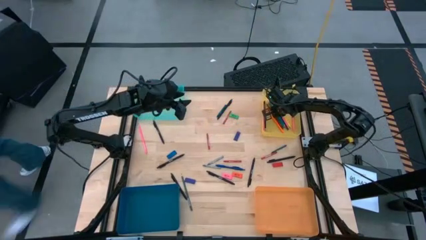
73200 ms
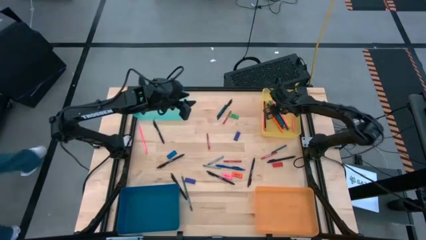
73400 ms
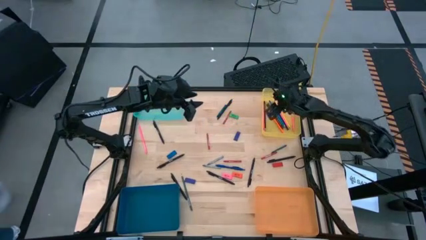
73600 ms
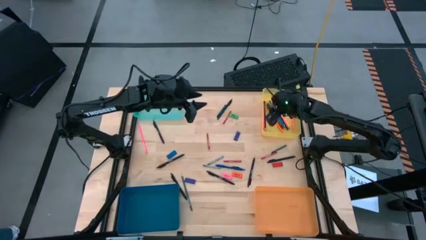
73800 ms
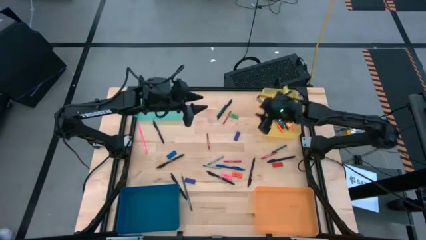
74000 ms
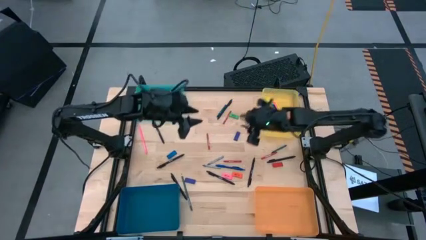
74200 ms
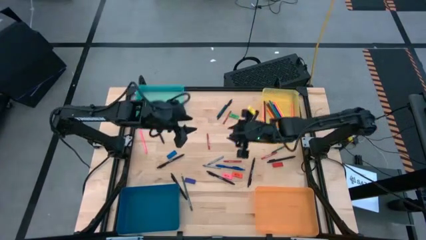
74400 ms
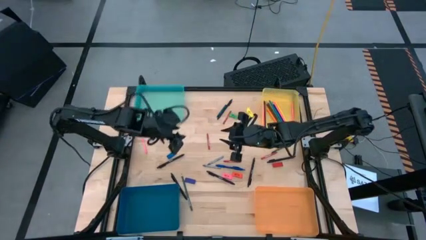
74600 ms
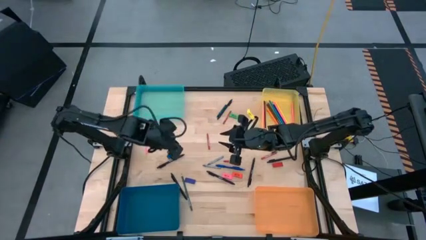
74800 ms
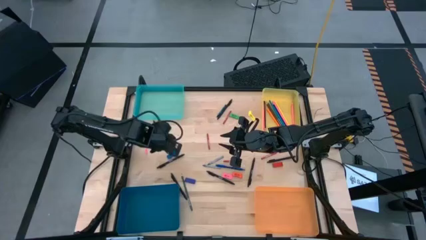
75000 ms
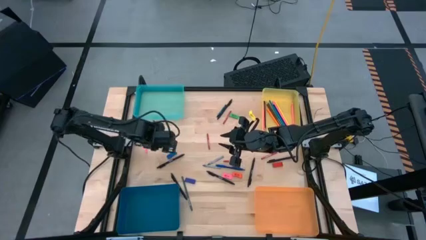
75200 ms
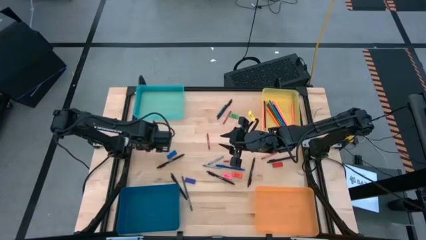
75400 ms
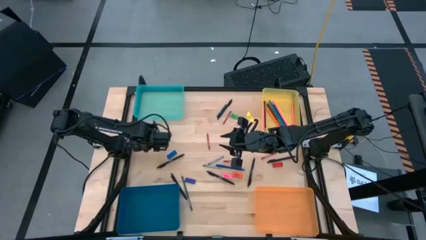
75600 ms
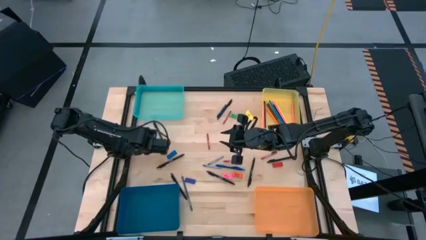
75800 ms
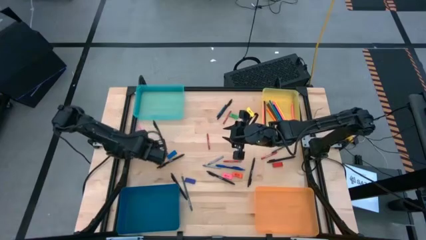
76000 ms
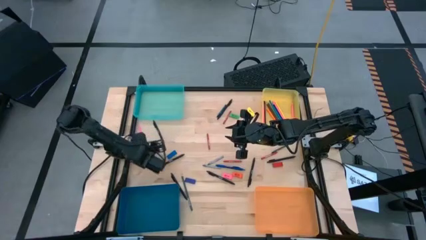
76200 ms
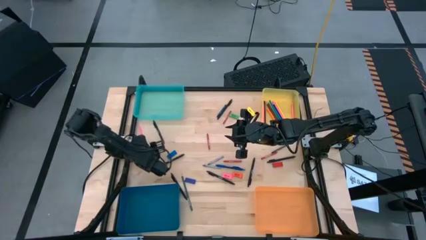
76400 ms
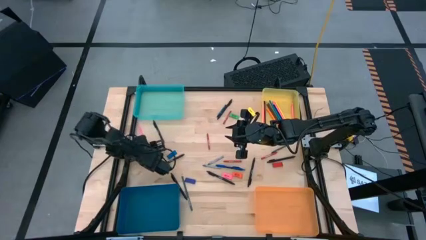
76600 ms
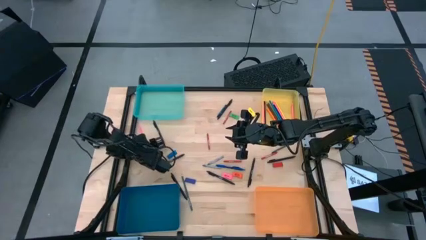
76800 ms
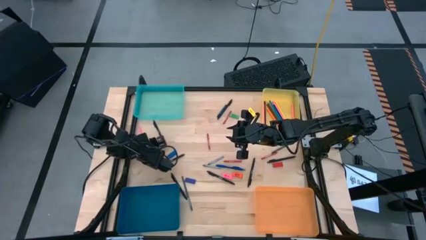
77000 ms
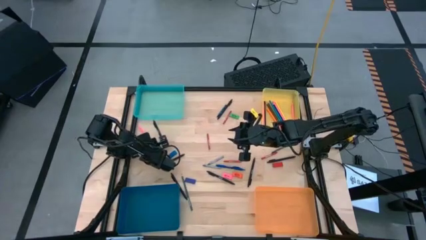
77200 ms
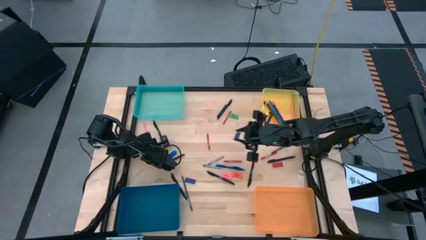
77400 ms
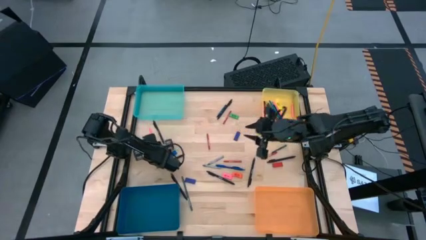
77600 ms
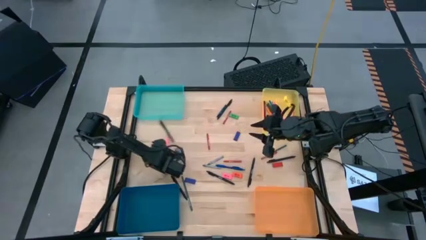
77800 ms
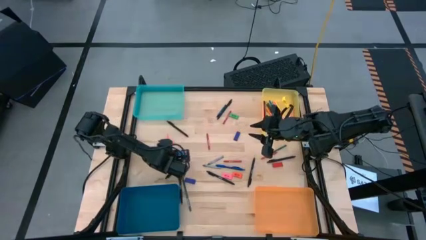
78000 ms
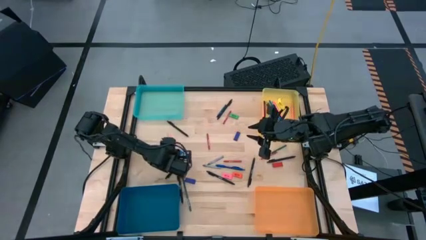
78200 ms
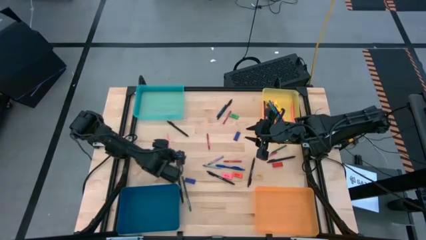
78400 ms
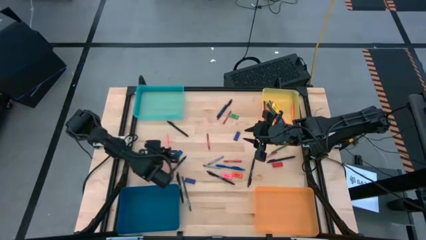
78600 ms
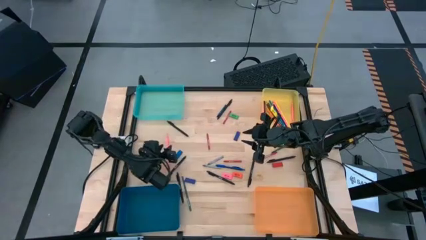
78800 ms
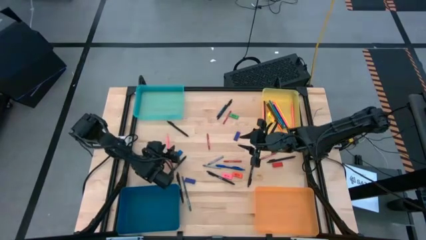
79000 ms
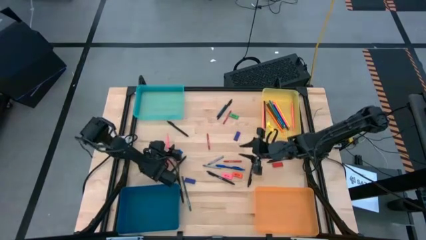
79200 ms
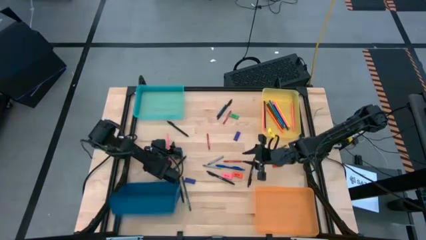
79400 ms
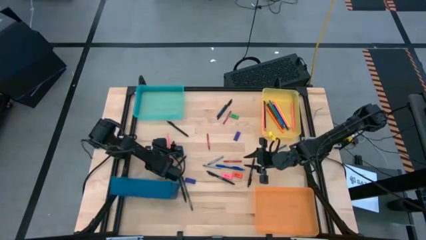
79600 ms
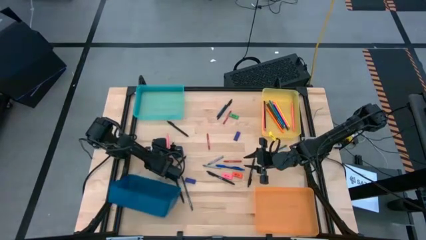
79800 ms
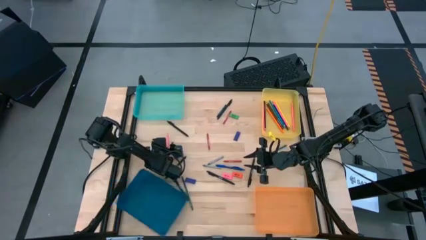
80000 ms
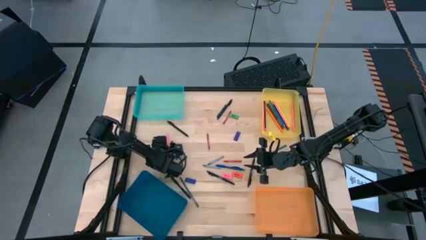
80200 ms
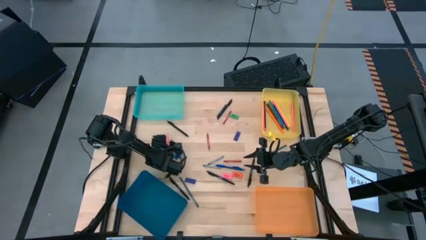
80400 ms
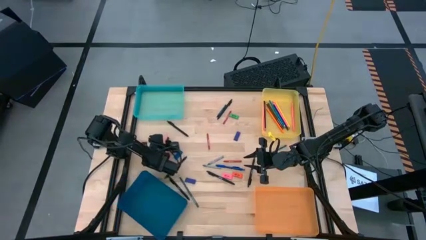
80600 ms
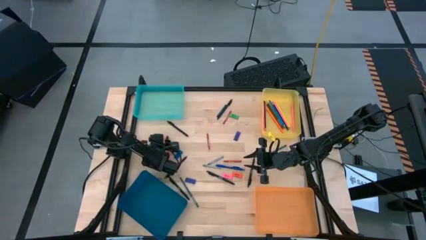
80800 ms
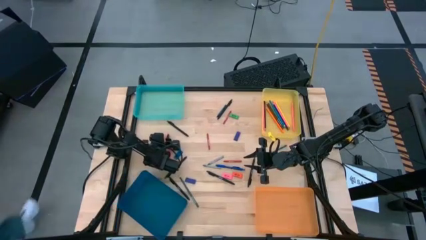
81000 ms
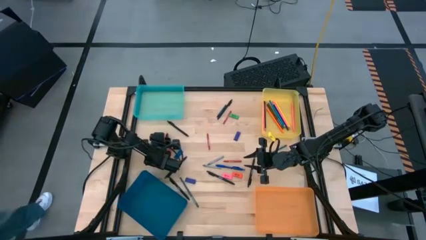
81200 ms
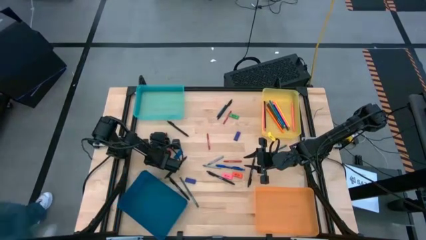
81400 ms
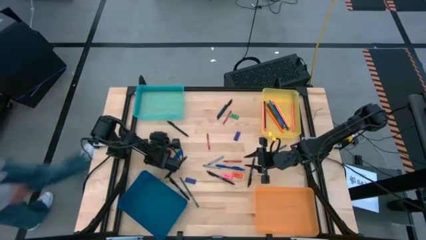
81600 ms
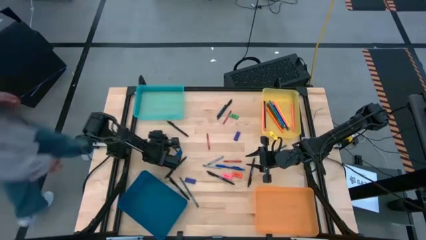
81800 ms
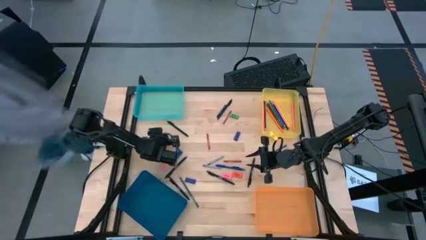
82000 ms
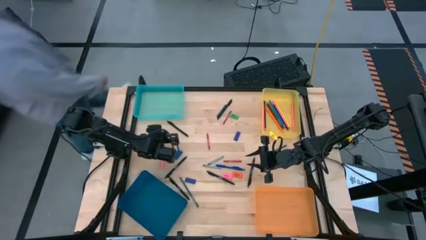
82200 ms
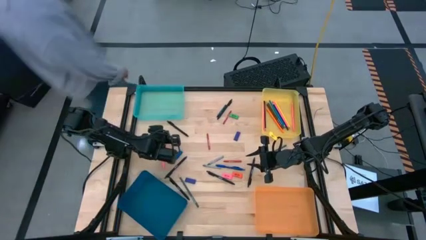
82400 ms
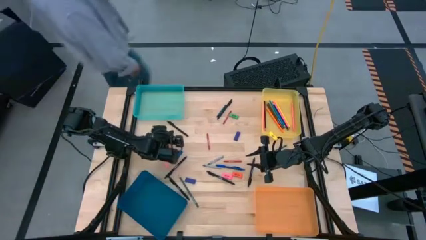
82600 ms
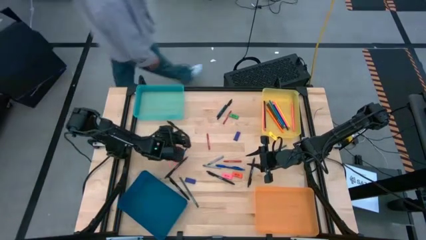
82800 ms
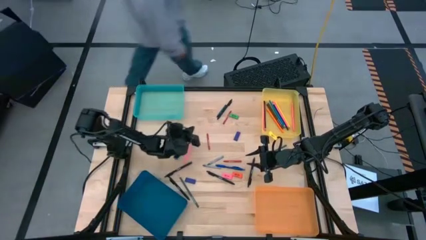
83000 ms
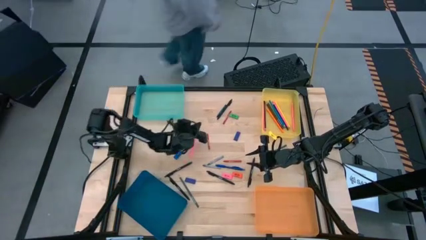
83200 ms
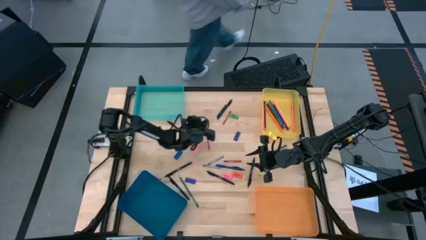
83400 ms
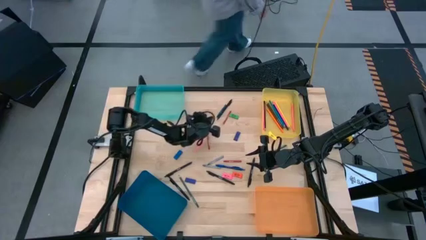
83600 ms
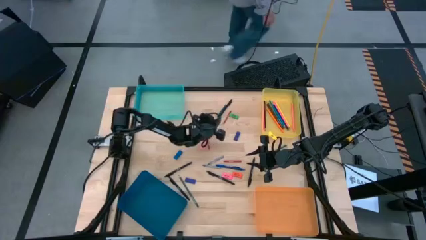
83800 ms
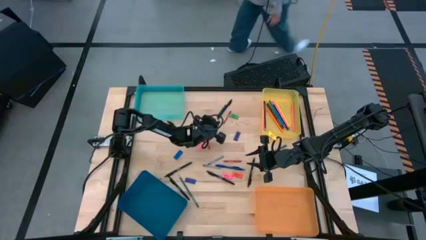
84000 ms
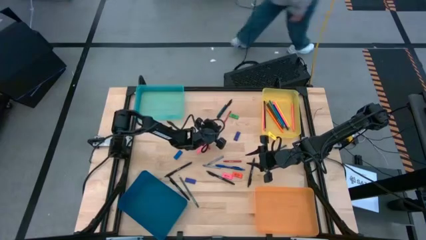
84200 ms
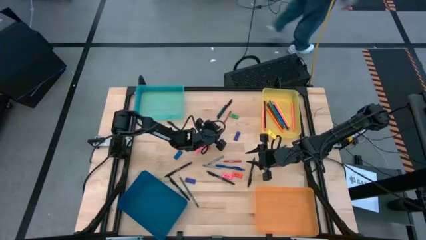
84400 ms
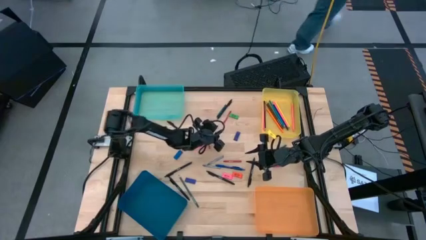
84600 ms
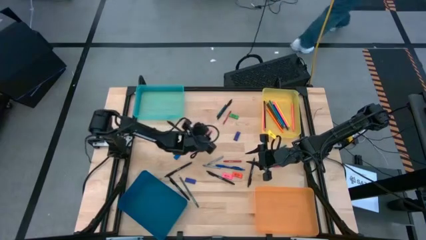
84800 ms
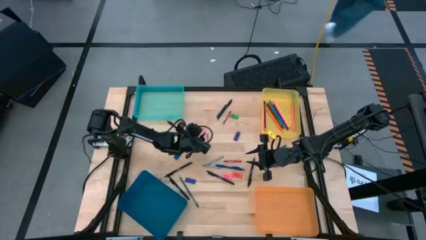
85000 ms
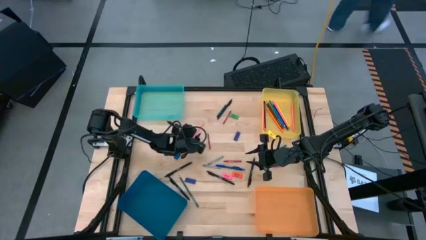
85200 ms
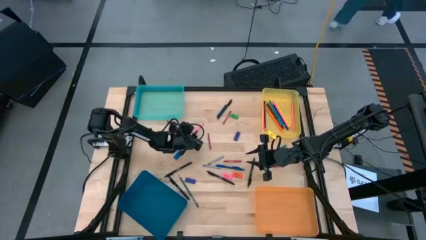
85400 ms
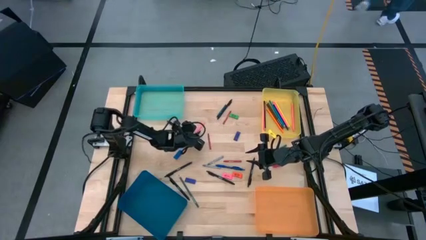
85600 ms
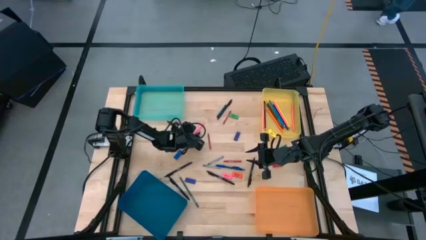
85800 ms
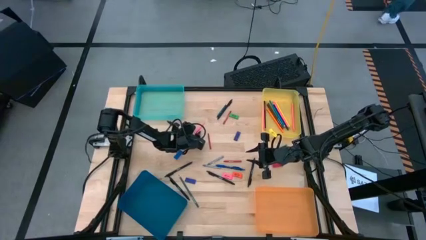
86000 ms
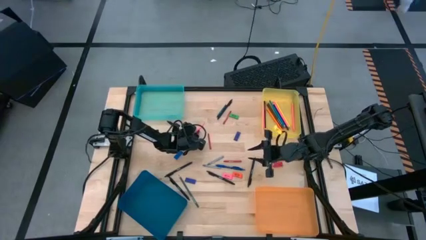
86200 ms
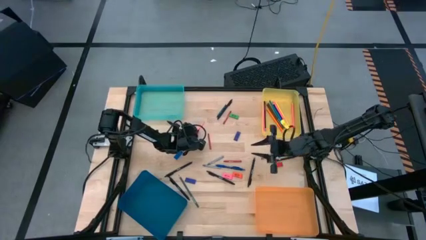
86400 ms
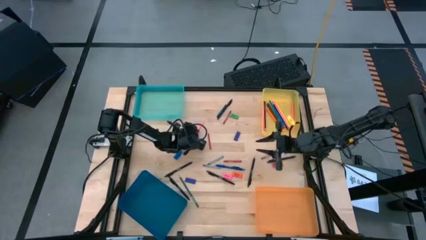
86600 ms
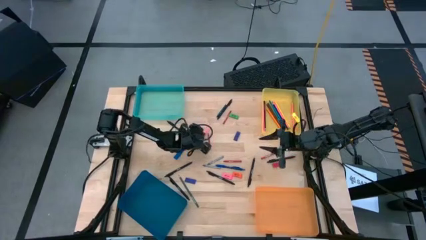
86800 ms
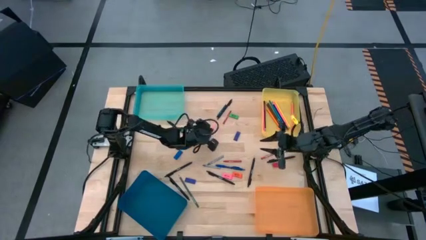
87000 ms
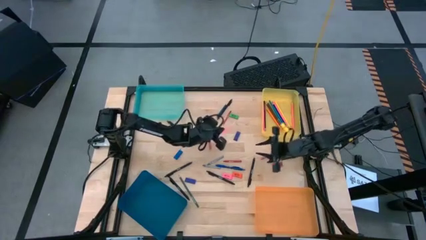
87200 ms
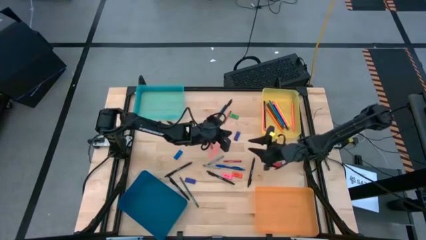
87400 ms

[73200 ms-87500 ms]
Task: Sort crayons/erasers/pens/pencils in bins
Put the pink pencil into the yellow bin

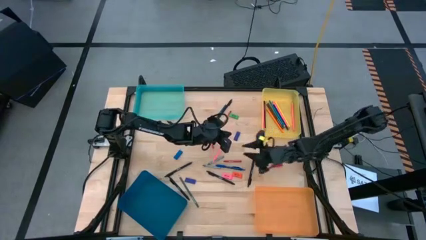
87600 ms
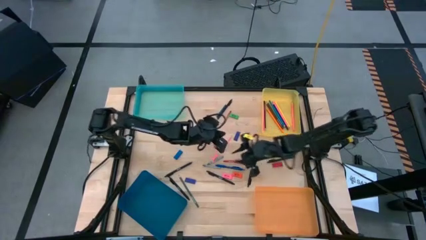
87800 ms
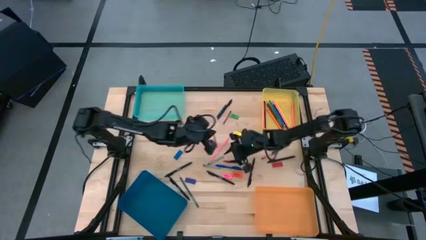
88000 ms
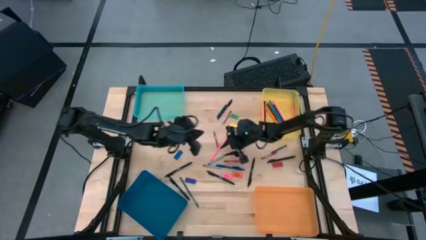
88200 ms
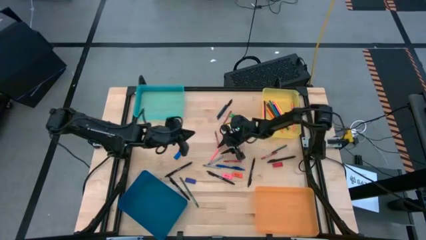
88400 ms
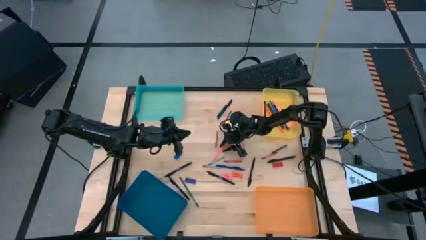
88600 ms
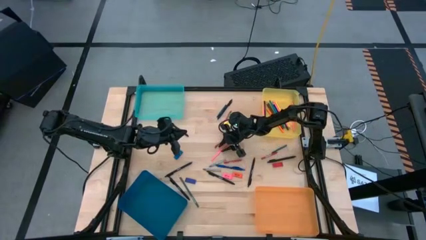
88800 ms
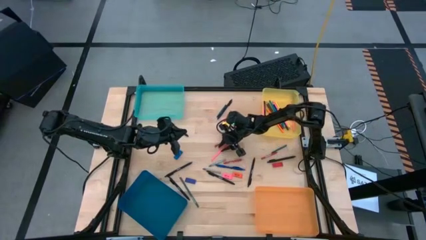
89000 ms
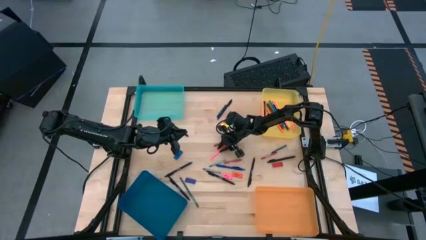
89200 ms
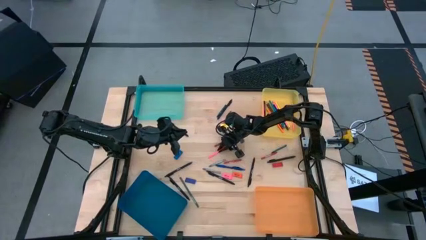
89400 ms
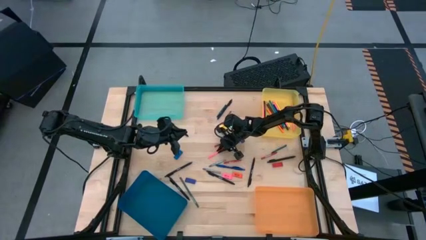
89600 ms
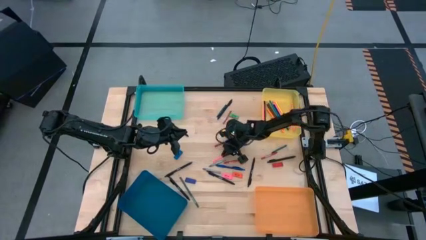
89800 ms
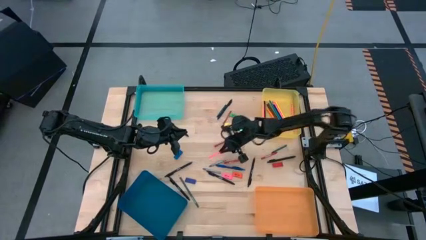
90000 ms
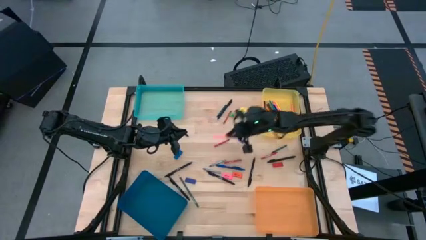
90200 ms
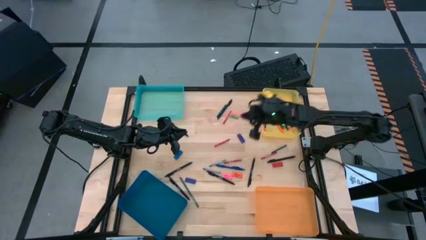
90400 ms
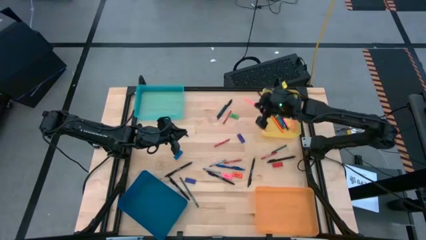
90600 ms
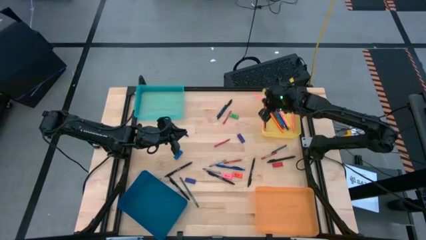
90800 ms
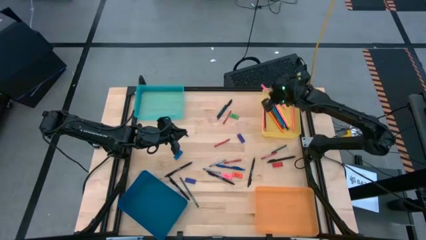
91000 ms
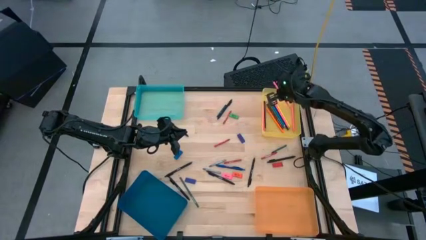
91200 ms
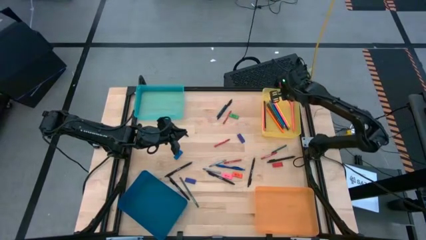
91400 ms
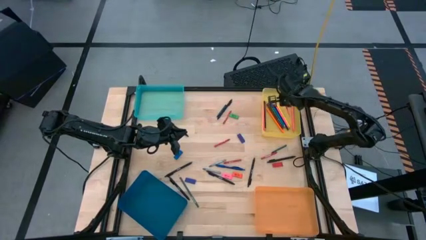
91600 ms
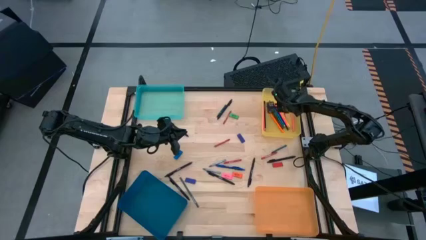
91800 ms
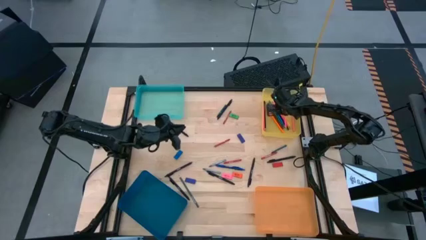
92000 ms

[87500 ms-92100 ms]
Put the pink pencil into the yellow bin
